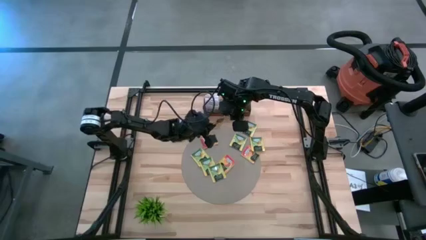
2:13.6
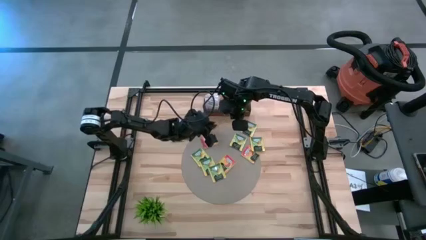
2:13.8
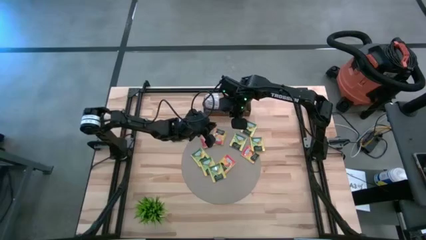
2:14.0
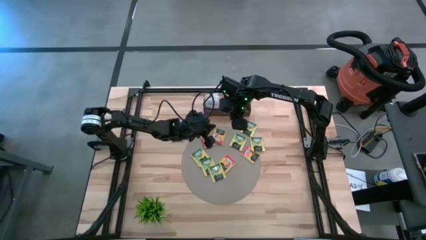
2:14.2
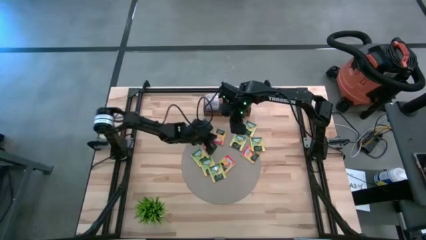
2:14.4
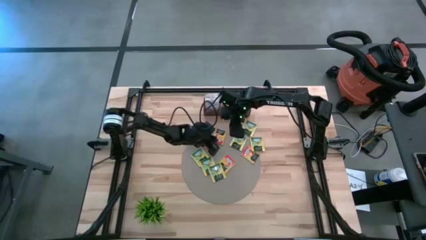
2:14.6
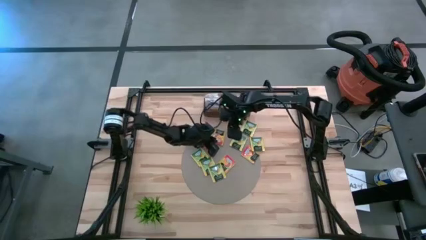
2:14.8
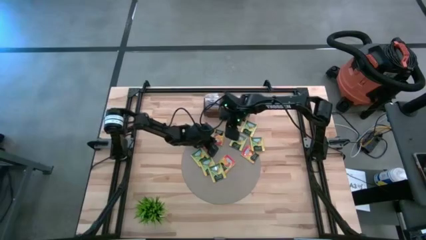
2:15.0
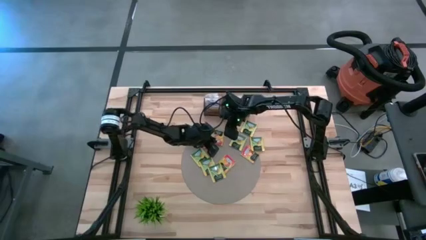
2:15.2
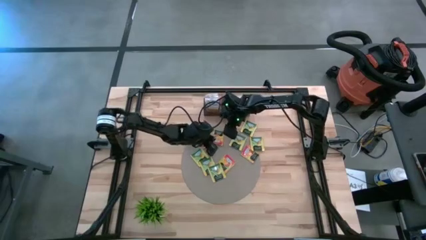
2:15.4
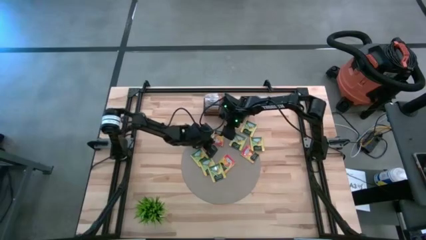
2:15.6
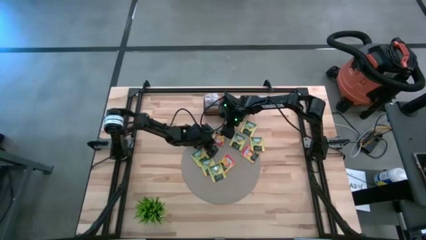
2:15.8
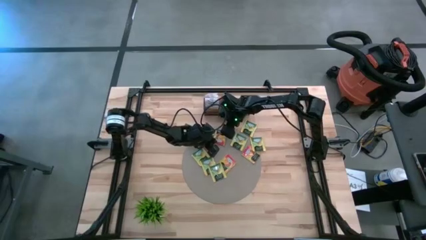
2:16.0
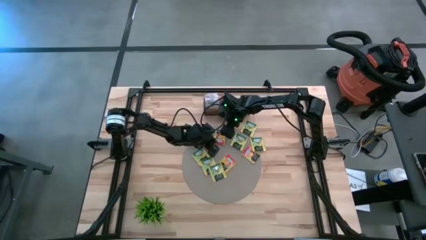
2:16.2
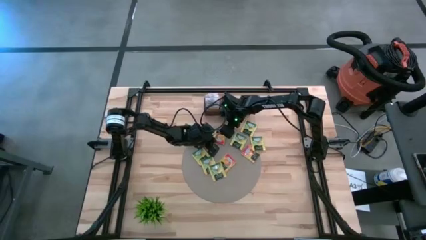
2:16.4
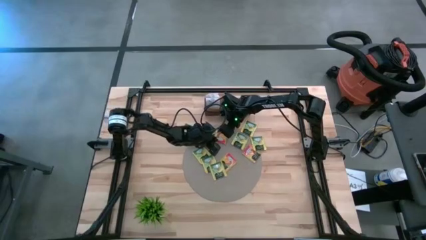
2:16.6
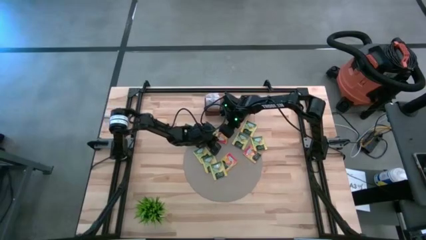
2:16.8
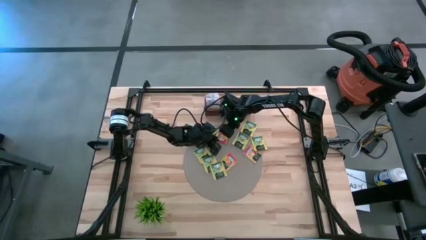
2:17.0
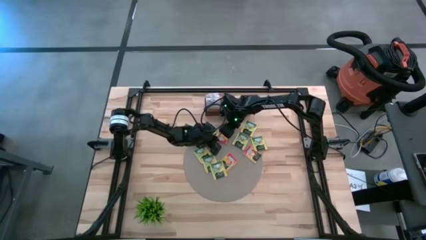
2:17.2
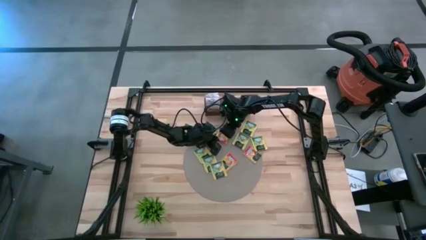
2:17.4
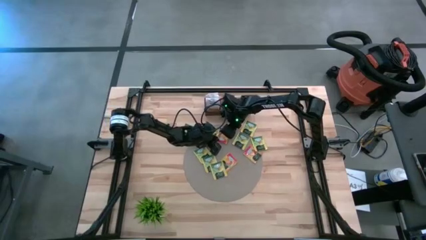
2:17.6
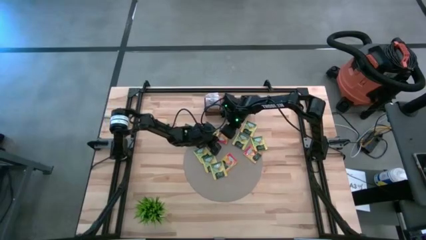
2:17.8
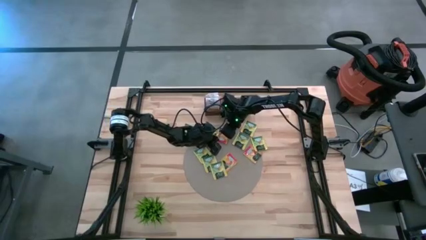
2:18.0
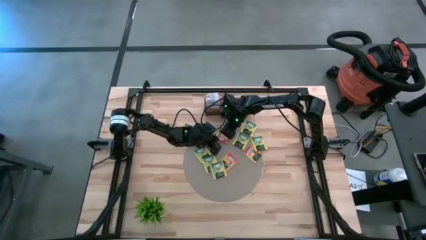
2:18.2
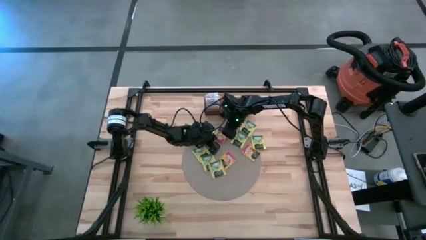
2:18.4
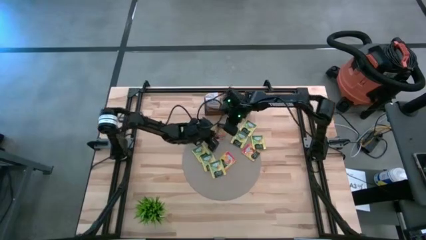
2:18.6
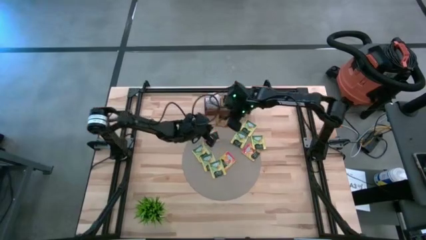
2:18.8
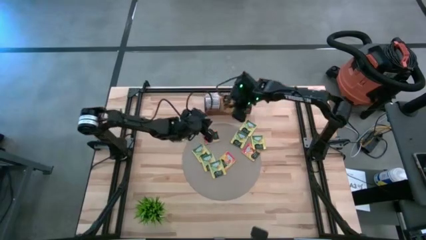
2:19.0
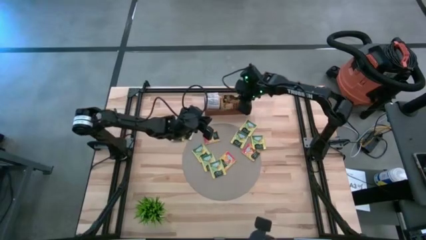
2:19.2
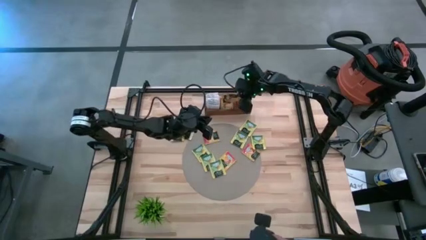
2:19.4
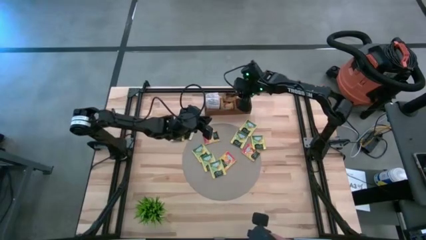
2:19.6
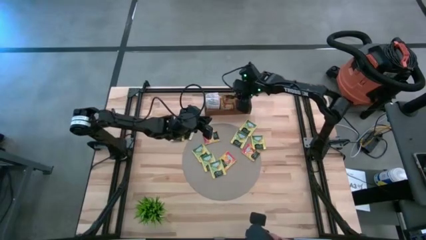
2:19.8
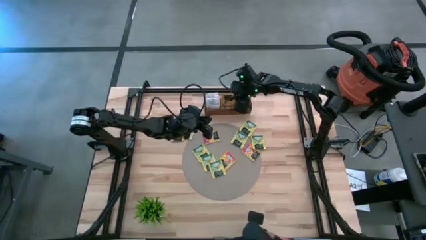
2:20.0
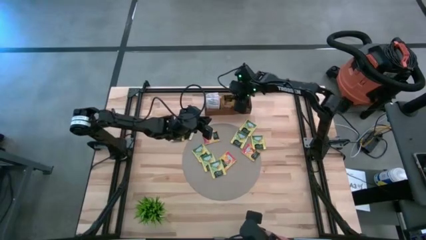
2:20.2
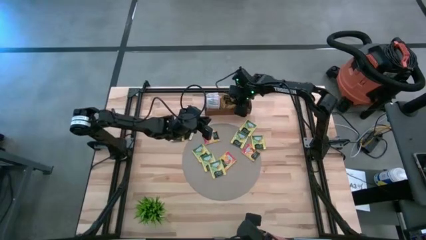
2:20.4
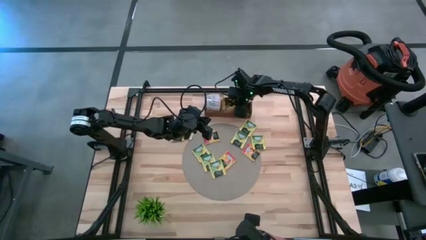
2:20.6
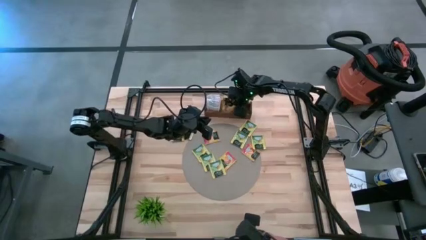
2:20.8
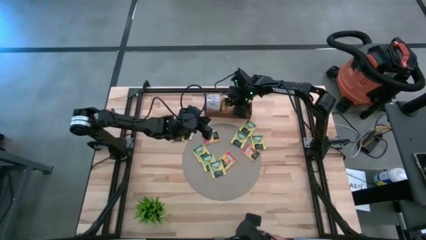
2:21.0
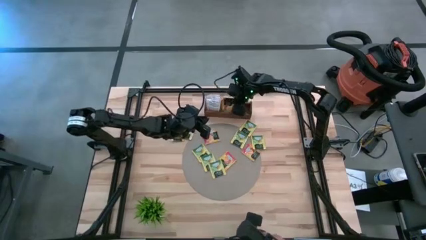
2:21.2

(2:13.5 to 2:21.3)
Task: Pick & Place Tea
Put the orange tea bag into the middle section of the wooden organizer
